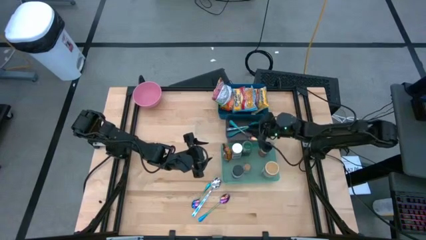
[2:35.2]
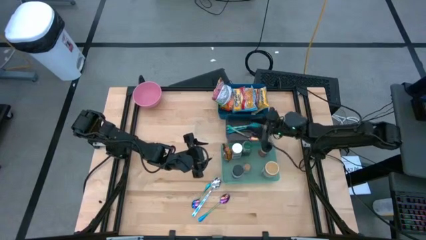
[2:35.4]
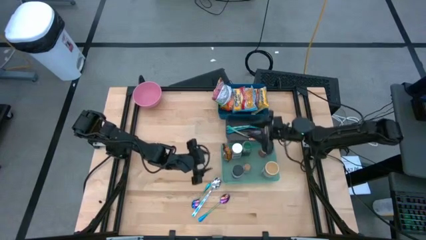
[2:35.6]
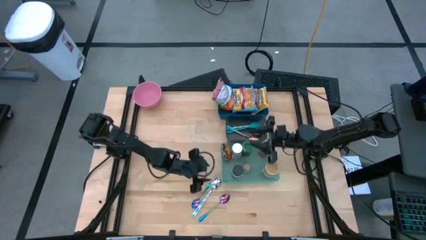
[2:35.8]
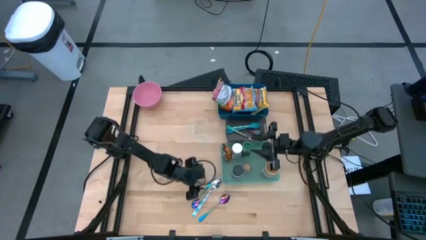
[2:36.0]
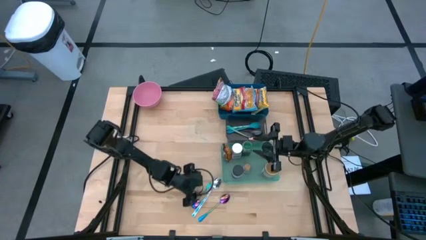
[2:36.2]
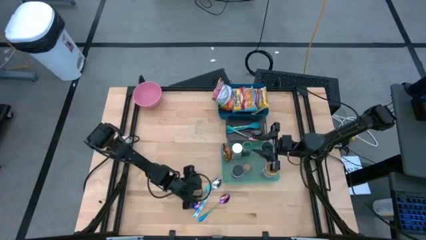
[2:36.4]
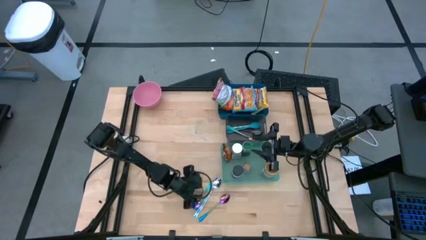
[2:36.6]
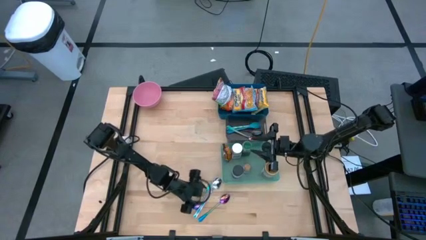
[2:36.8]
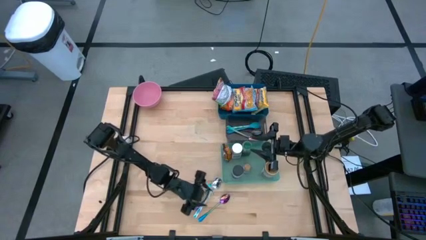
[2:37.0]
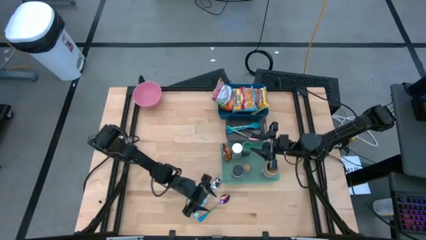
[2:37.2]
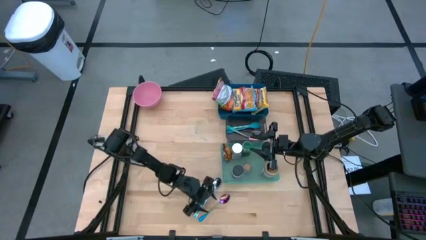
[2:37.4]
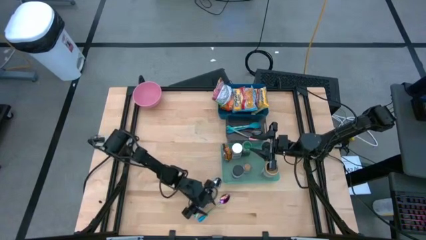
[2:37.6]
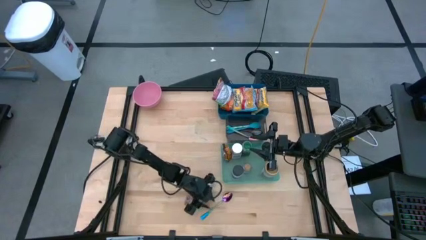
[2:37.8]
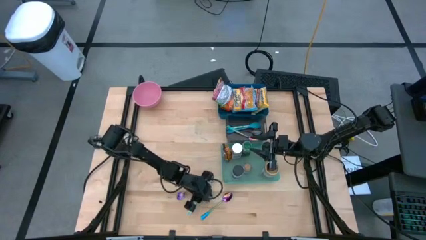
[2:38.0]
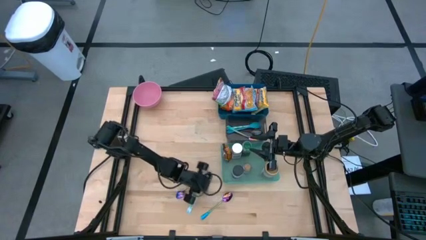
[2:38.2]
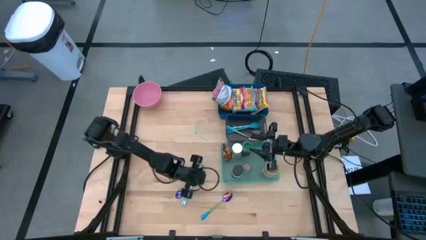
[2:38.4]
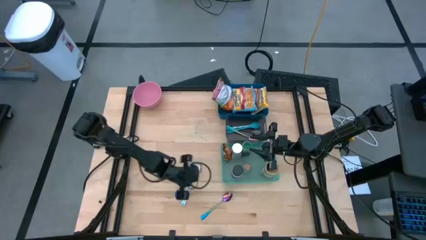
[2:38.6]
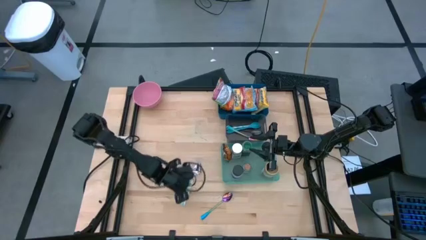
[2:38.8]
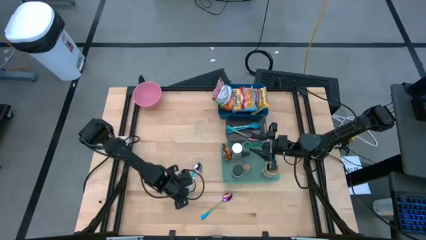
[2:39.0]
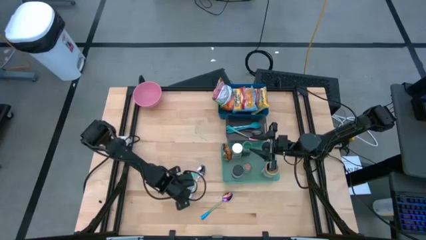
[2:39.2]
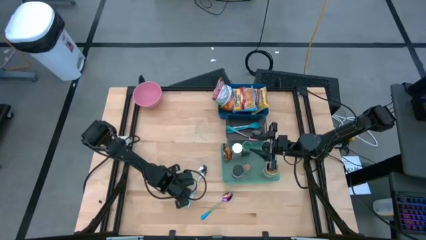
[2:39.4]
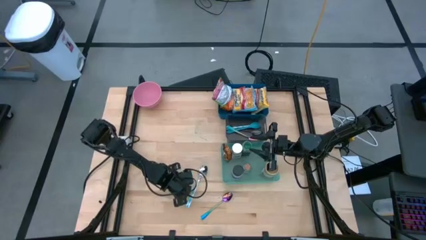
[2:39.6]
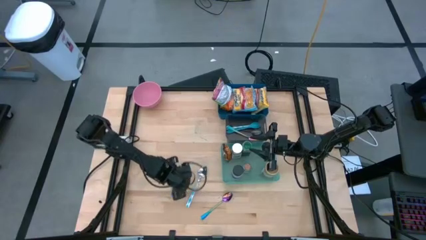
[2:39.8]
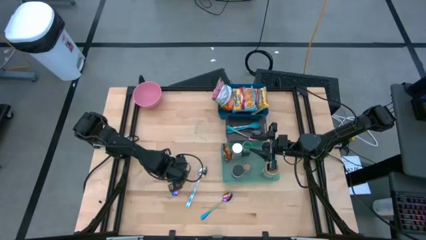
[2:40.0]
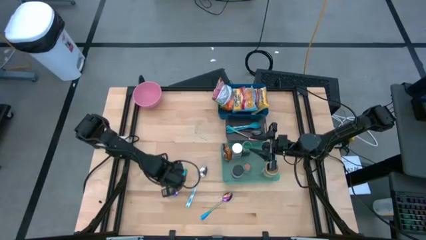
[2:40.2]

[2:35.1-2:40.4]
Task: Pick & Place Food Item
Put the left purple spoon into the black bin

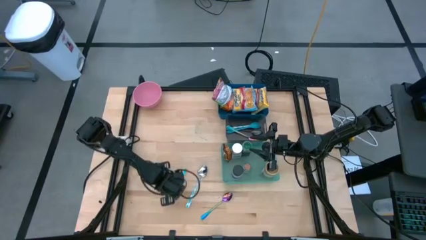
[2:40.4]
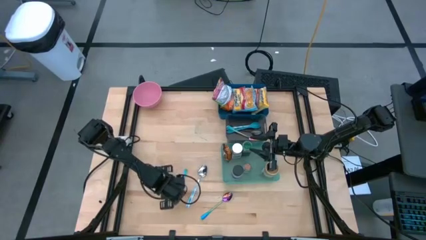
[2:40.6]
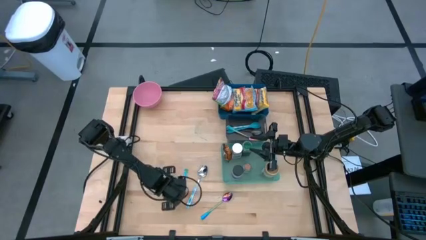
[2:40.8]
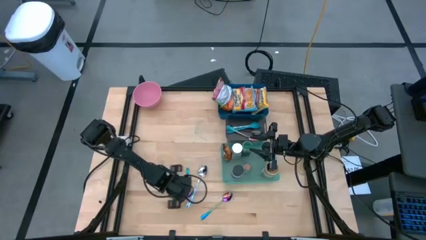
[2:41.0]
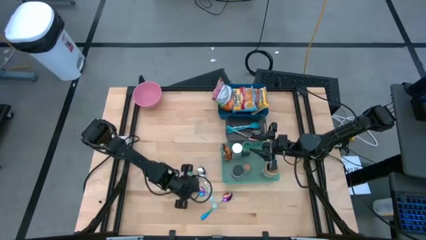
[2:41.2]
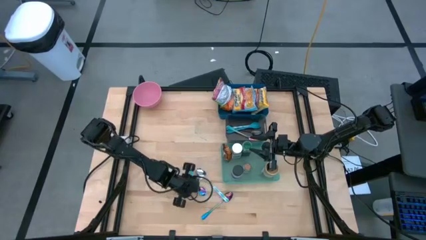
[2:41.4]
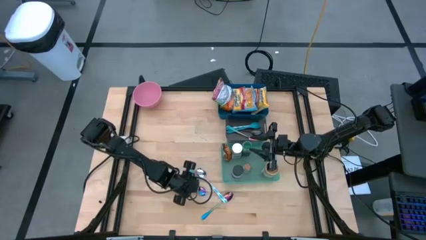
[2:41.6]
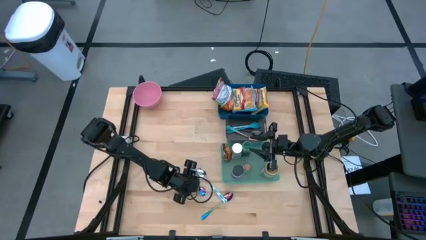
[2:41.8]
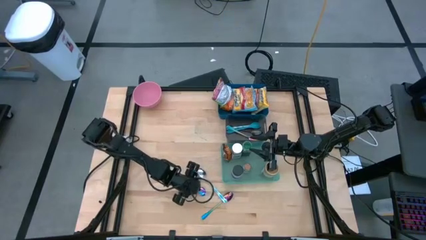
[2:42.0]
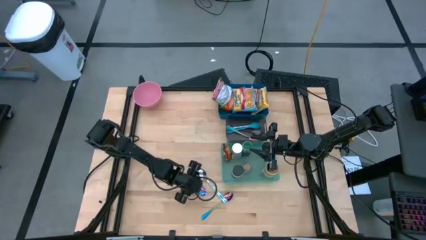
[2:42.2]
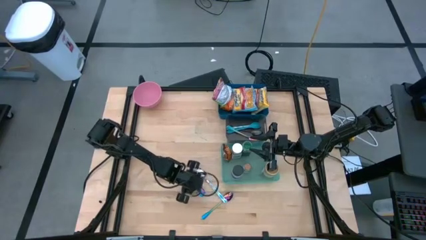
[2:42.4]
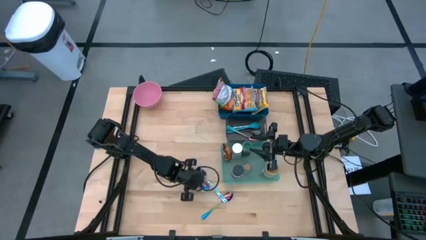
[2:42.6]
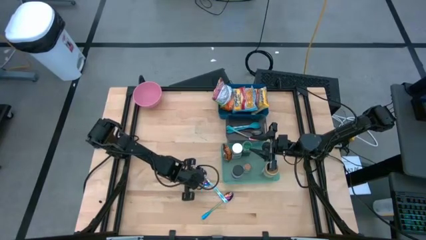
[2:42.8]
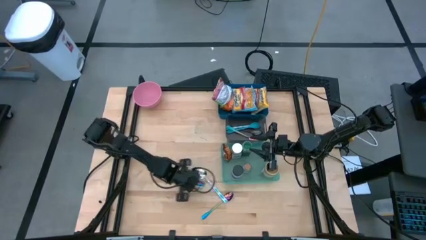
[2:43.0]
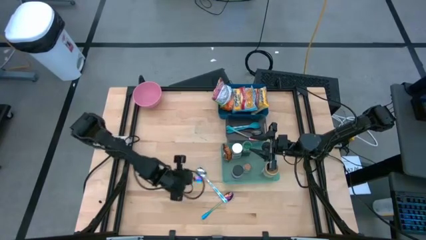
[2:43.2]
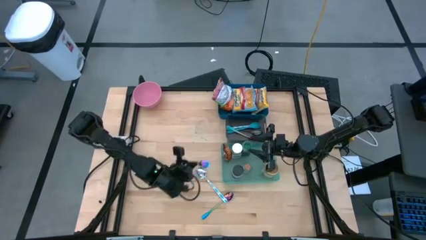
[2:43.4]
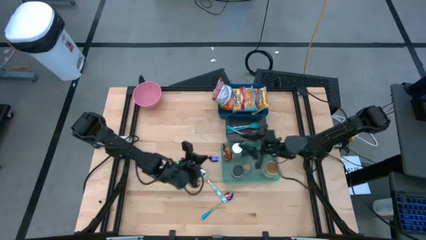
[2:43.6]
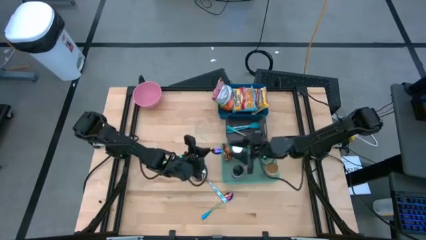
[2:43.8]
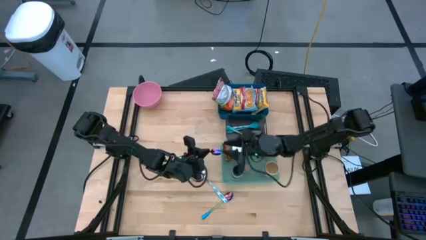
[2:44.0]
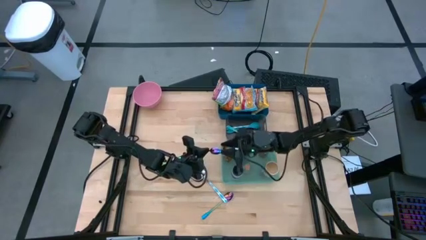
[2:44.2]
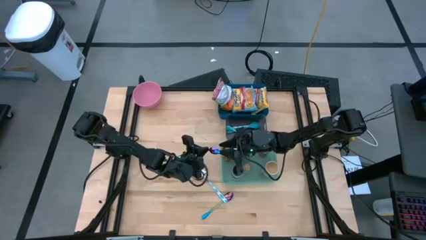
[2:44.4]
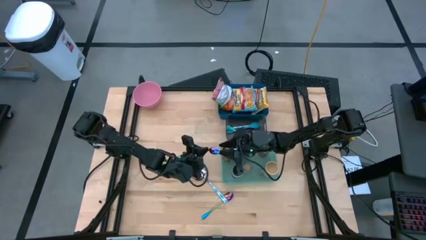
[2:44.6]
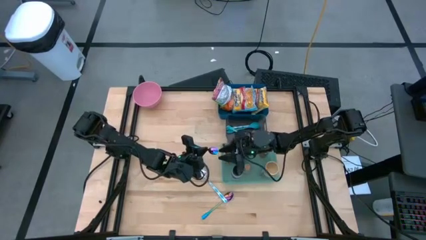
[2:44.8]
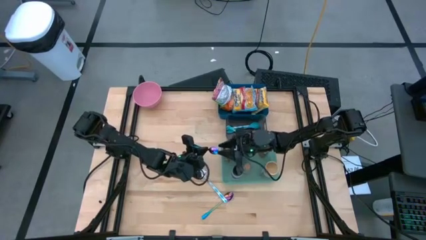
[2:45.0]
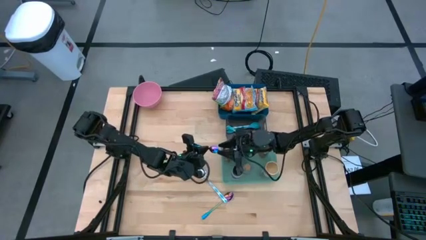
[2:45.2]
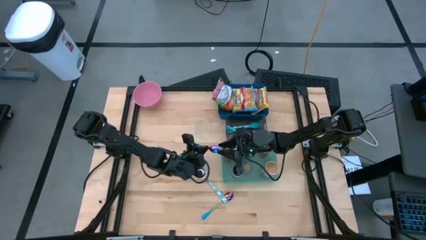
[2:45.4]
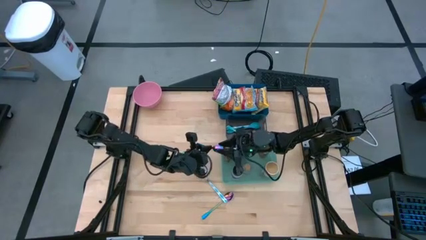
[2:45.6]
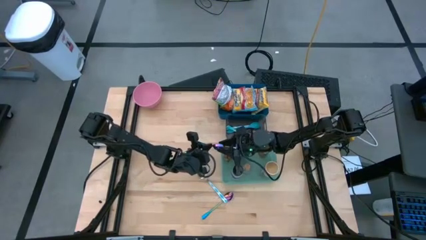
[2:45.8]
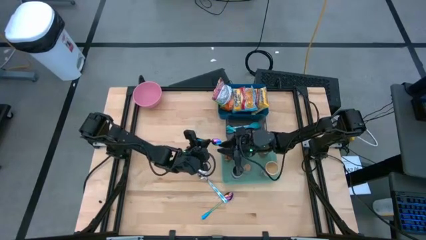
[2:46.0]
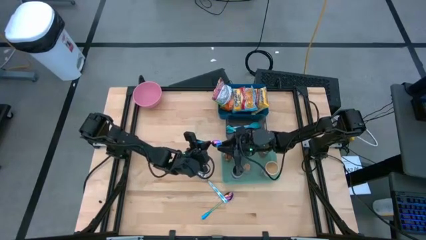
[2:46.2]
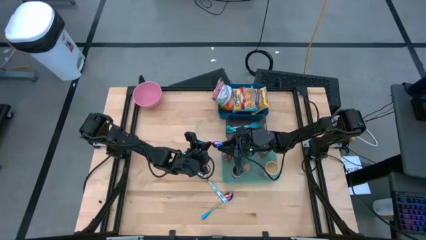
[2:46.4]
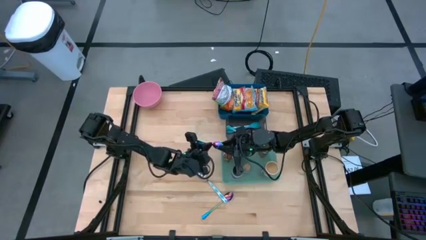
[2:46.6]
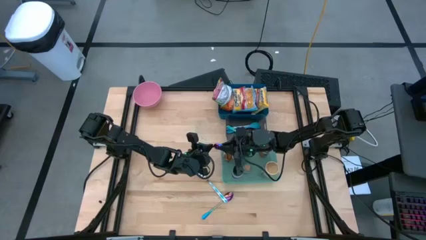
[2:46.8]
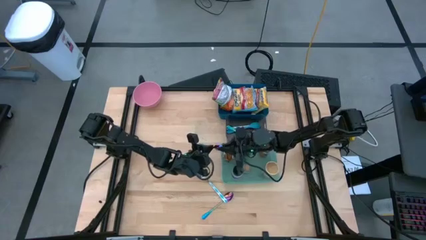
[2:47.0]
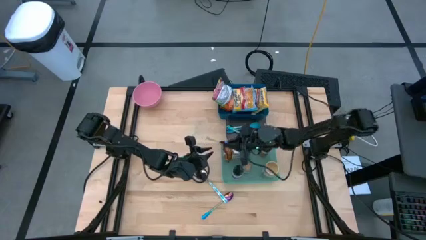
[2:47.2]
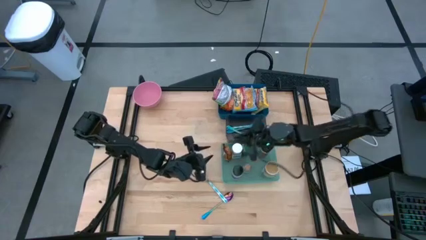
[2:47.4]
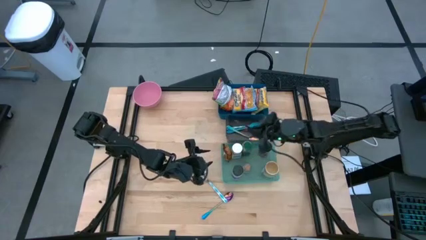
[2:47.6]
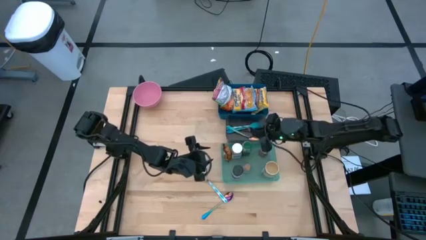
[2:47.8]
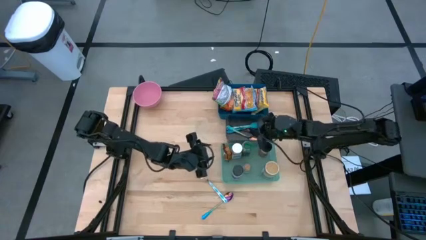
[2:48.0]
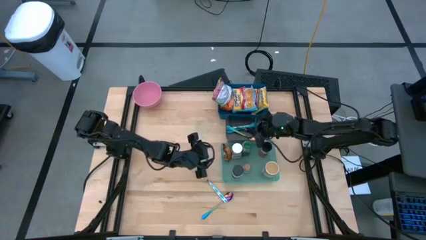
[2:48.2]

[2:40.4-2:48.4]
Put the left purple spoon into the black bin
